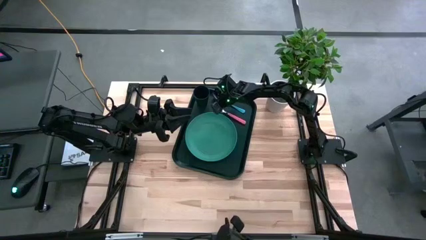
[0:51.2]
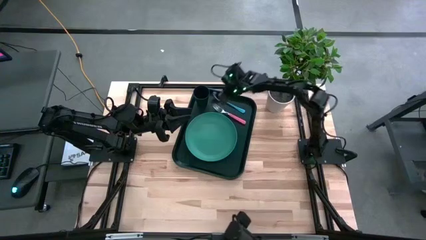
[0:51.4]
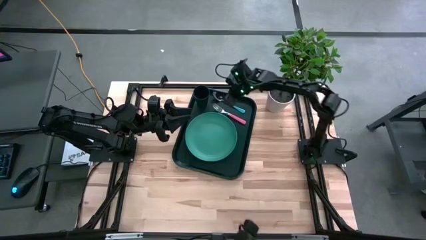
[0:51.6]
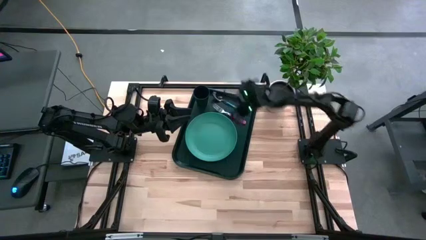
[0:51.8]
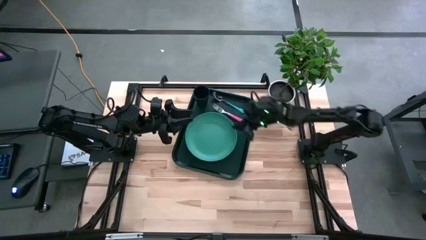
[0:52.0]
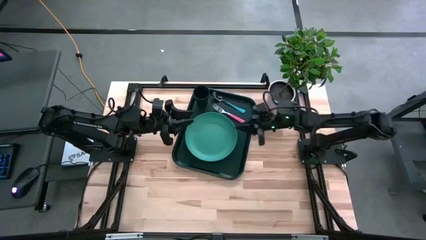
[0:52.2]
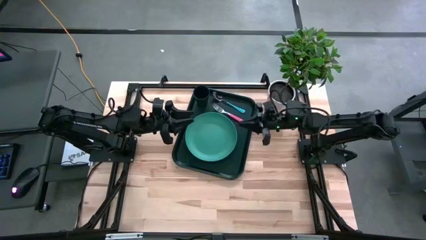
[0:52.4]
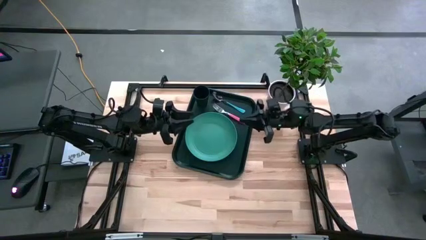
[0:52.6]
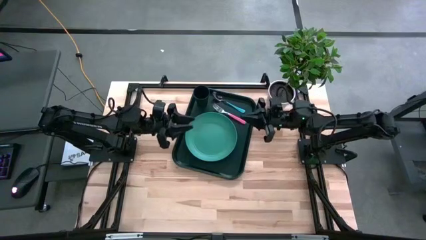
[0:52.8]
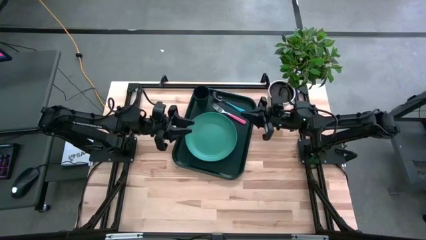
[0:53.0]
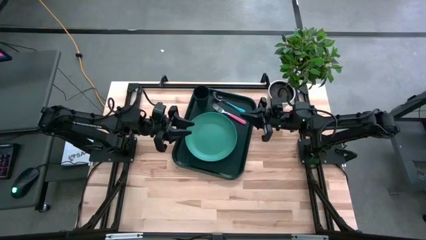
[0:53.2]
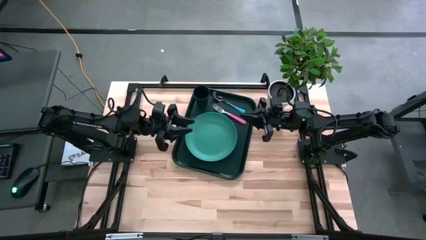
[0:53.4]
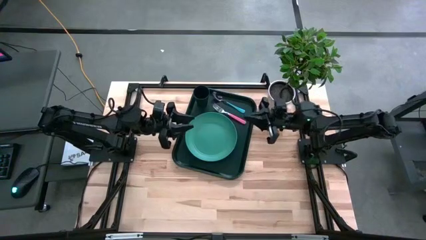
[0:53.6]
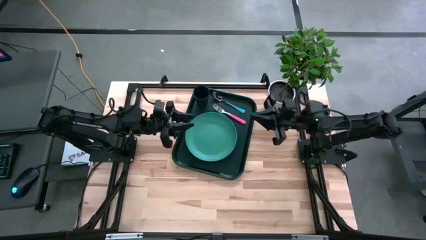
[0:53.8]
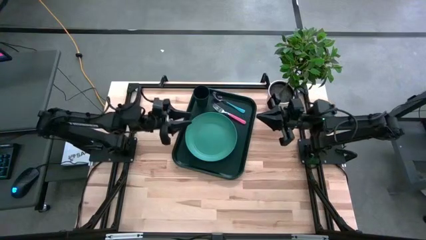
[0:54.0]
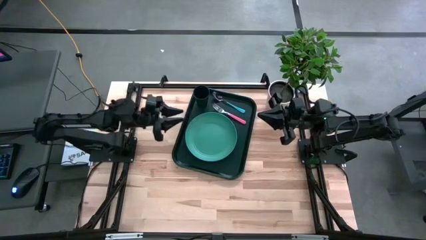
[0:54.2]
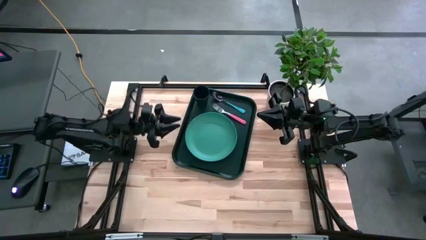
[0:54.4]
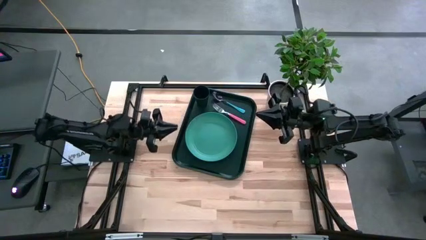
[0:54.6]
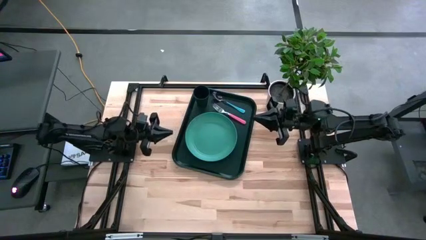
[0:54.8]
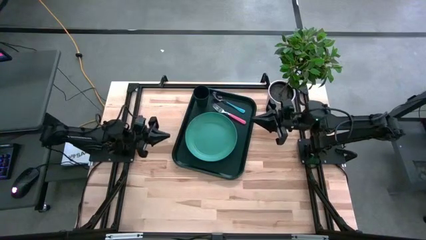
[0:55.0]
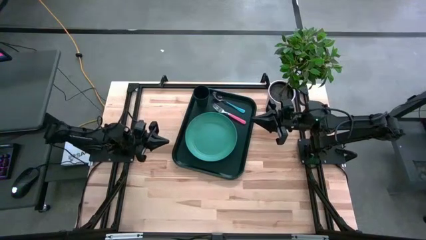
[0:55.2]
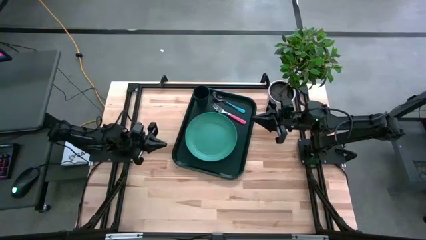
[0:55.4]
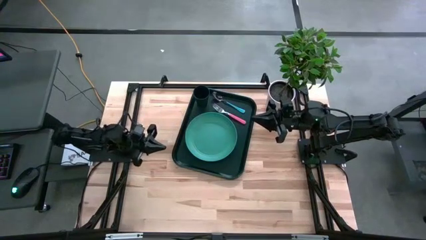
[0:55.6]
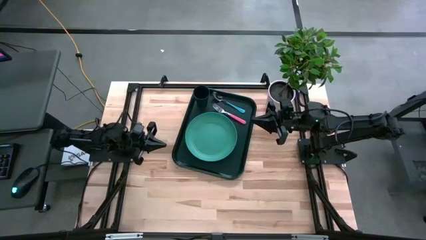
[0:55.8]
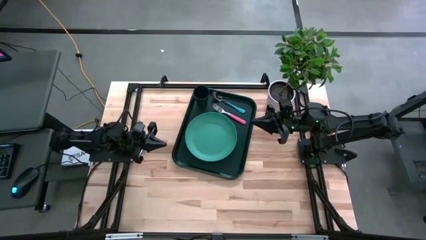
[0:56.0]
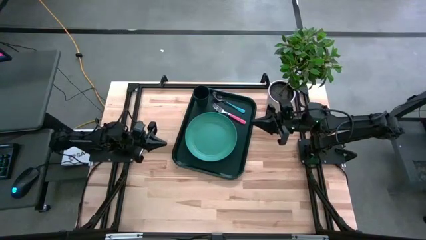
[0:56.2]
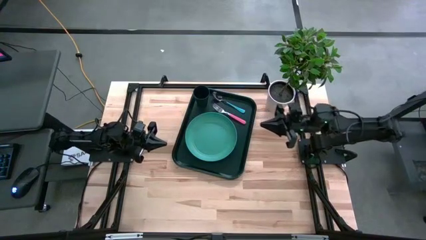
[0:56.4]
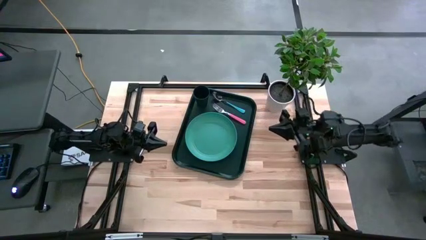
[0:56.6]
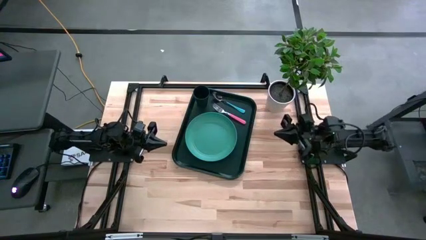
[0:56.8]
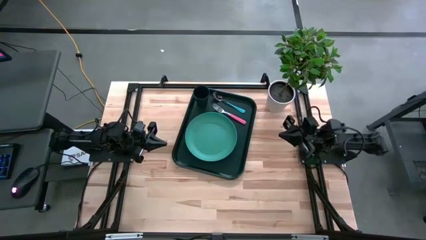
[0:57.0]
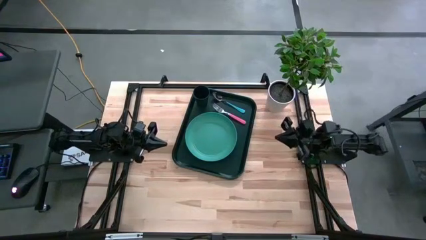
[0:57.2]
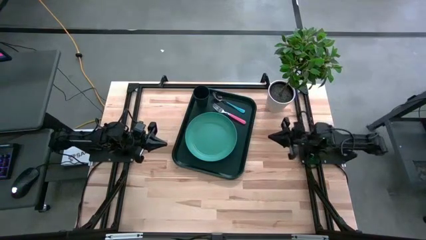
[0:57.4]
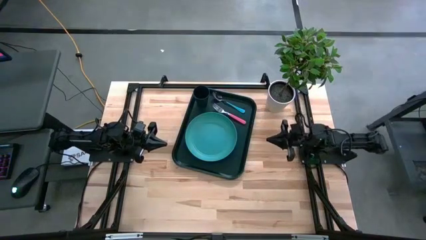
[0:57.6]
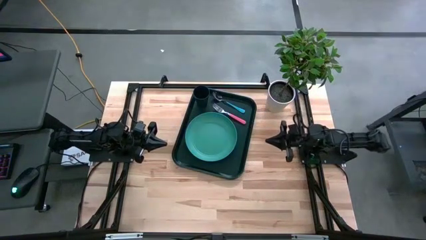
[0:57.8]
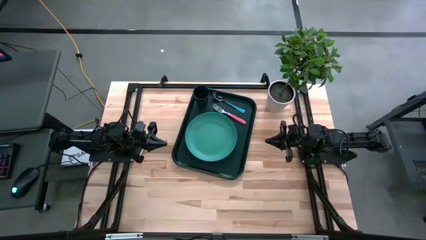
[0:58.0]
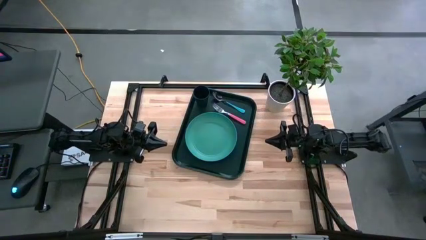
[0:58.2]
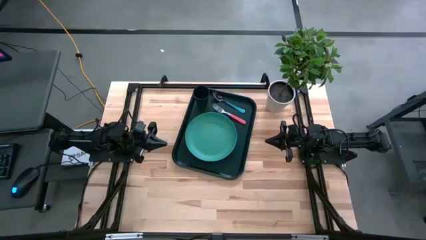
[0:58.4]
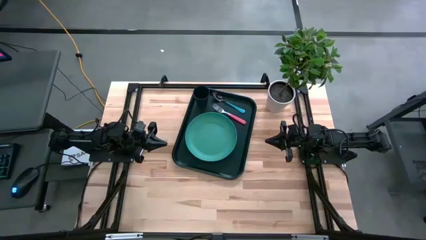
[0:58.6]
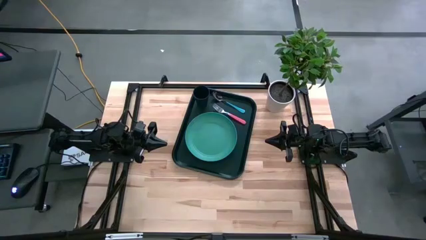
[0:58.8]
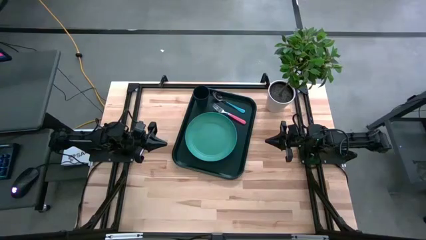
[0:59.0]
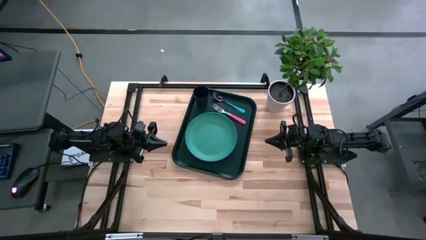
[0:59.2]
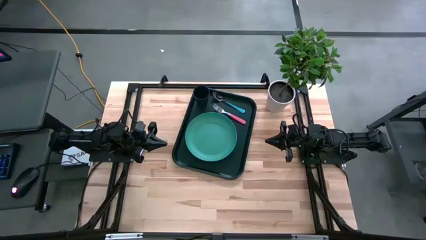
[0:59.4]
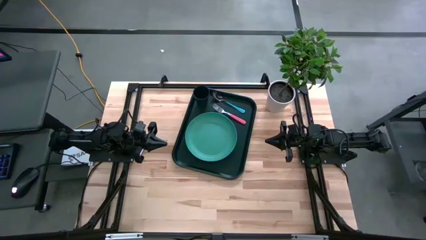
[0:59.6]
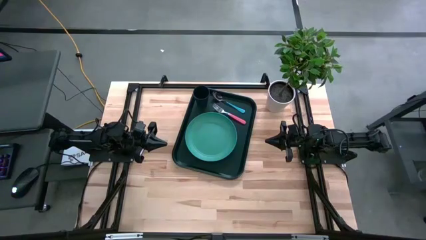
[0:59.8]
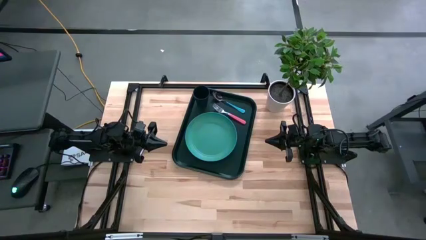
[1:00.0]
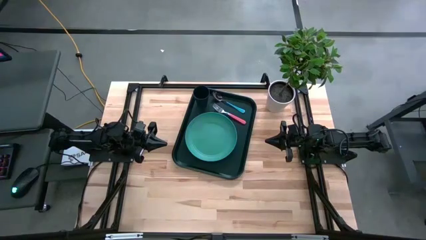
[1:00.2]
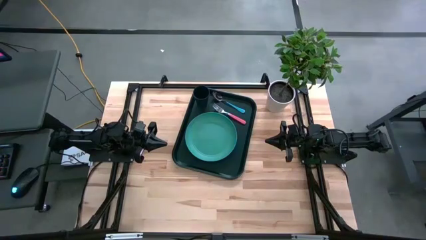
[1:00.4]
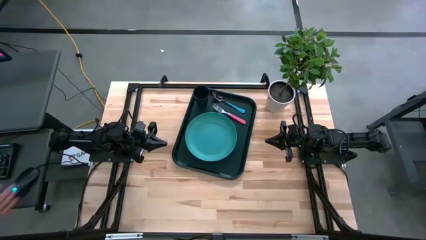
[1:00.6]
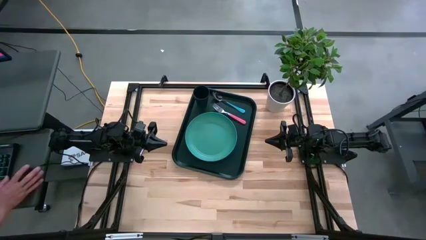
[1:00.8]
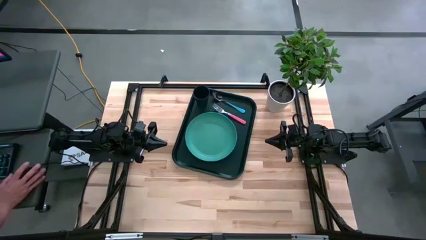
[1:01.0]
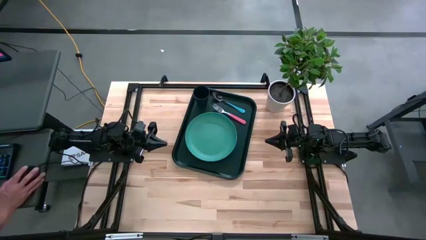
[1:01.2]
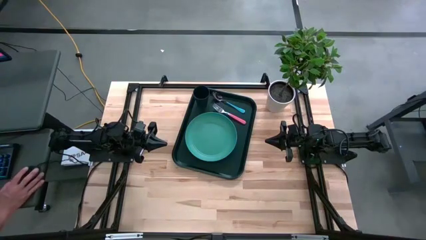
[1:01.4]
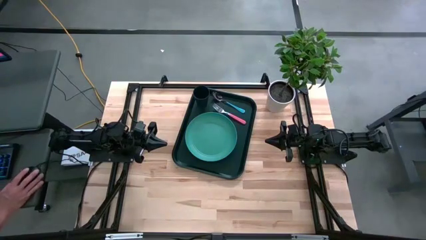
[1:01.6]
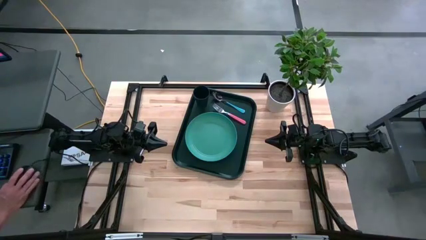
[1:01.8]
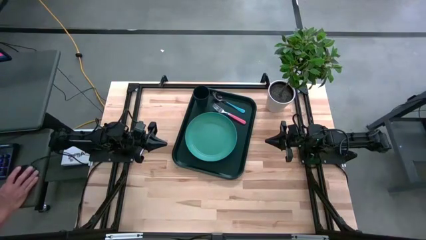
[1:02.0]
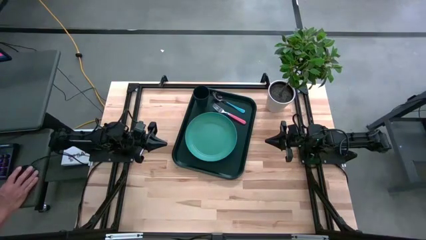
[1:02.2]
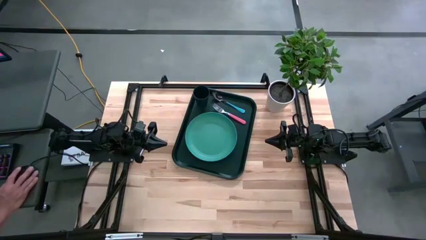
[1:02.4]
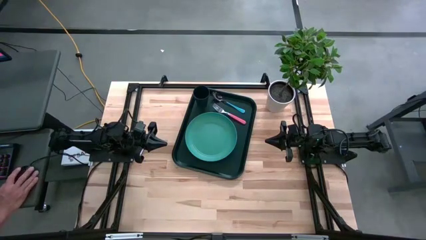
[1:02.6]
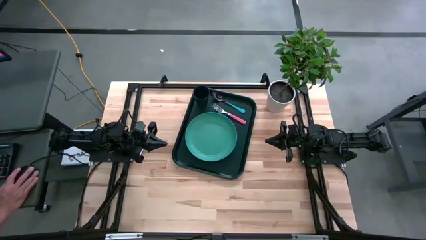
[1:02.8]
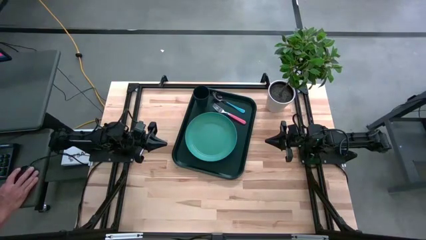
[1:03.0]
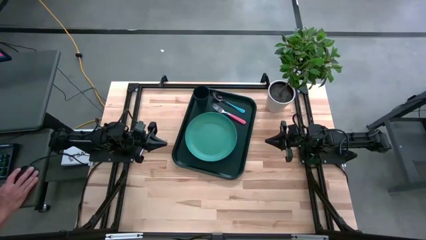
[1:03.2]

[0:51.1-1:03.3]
Task: Pick and place plate/cup/fork/spoon on tray
Return to Home Position

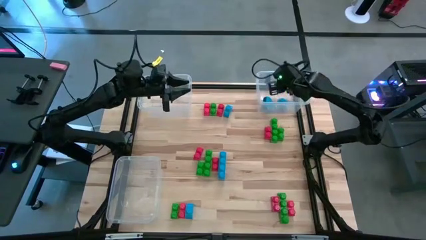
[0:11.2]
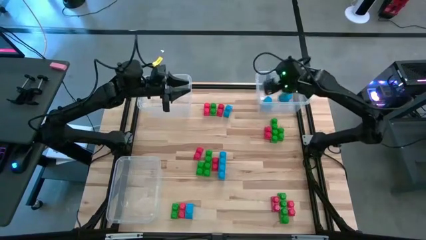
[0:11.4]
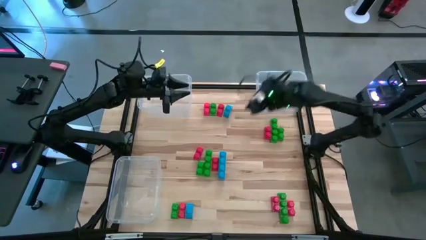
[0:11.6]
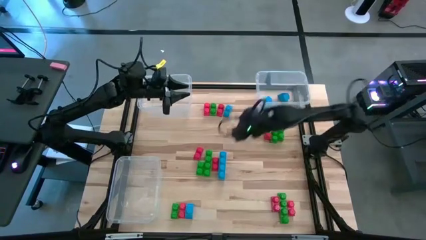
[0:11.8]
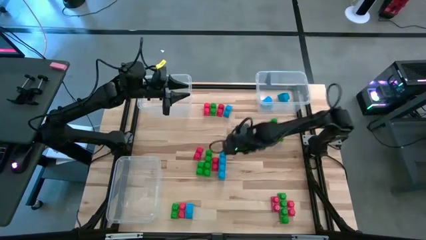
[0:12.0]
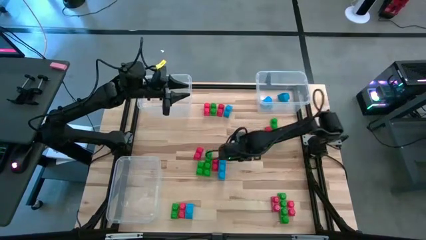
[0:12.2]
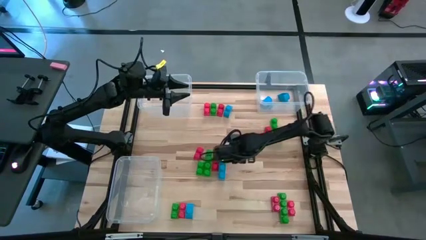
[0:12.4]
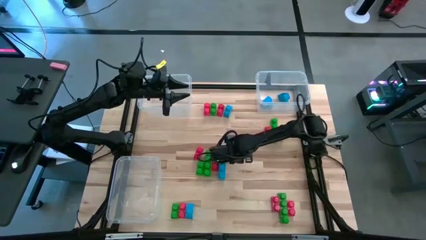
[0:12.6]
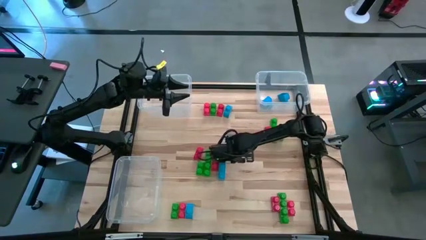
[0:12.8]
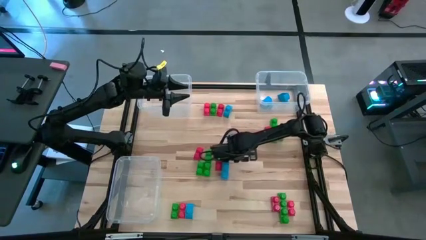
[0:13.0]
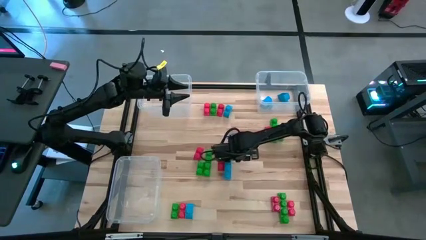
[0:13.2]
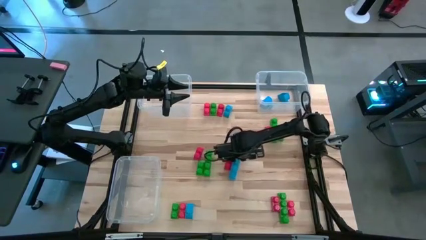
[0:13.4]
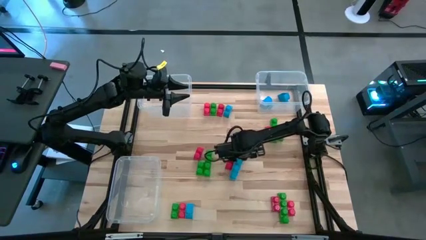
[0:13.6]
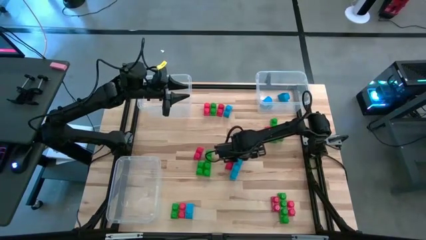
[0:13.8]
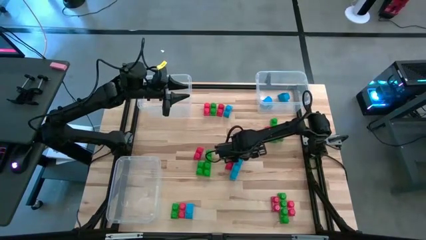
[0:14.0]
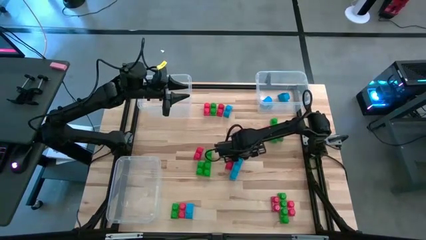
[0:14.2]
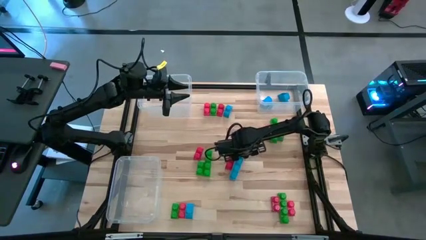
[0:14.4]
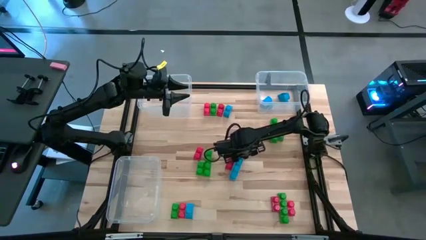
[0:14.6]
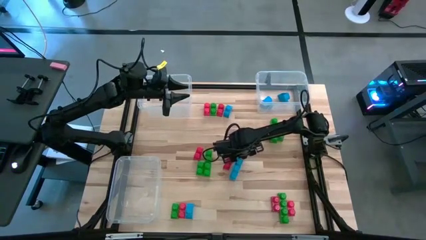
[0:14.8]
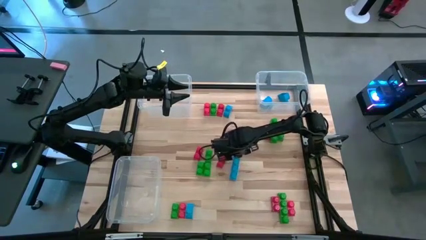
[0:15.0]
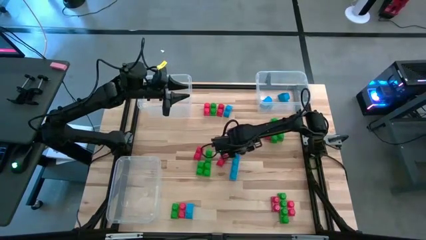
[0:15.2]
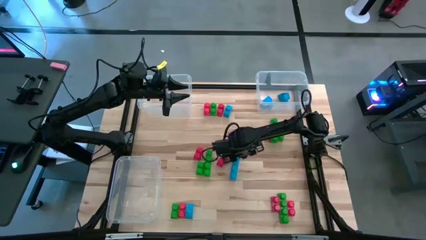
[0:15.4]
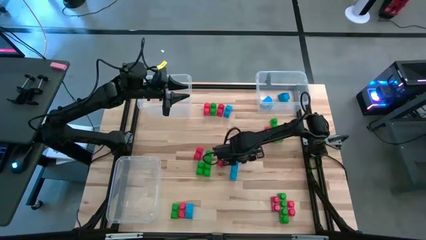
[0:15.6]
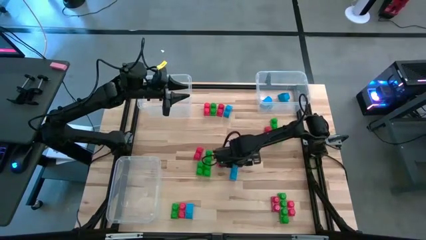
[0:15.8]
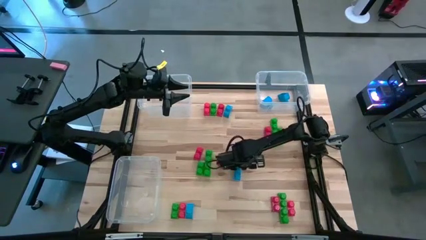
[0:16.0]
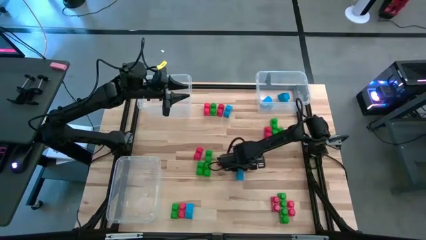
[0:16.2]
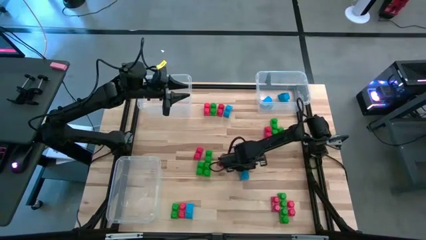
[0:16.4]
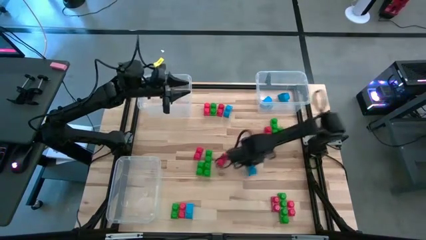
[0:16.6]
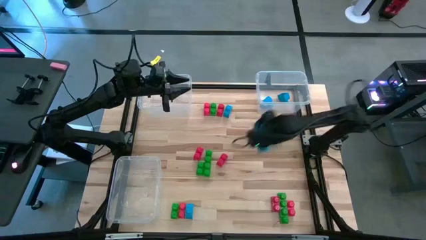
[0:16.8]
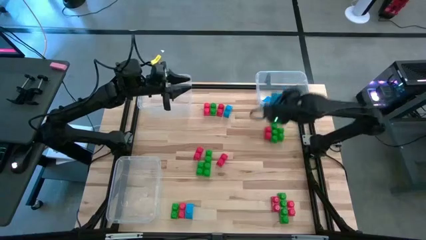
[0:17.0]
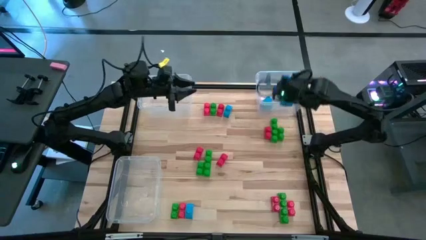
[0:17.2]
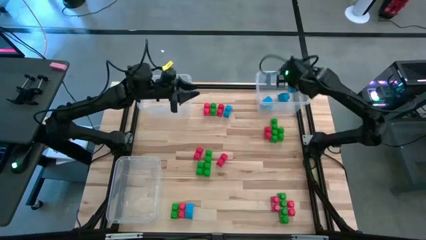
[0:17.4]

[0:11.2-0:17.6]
Task: Sort blocks
Put the blue game piece into the top right transparent bin
